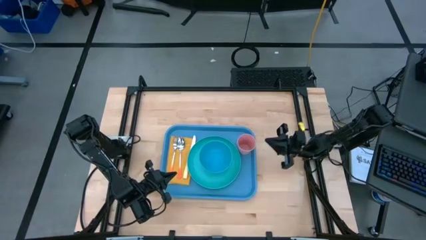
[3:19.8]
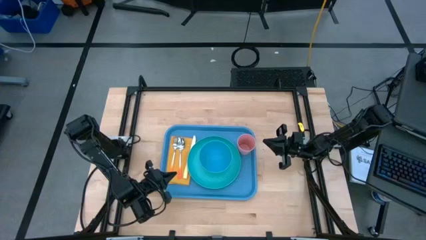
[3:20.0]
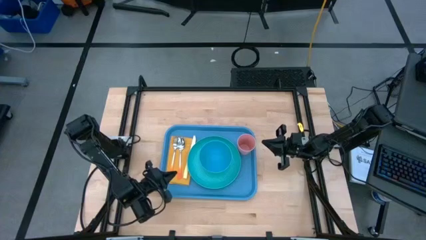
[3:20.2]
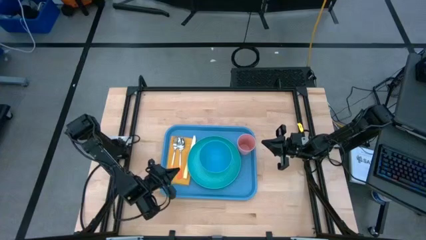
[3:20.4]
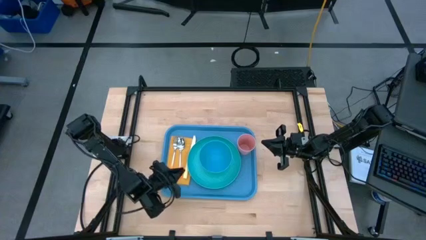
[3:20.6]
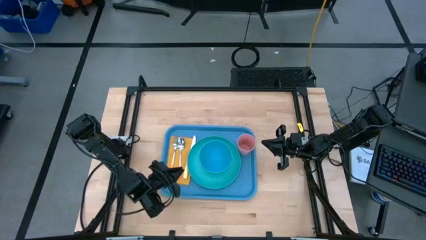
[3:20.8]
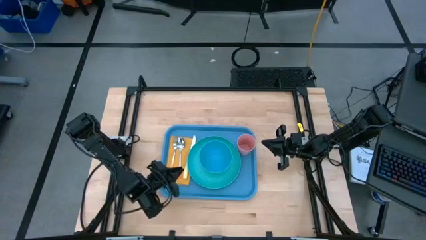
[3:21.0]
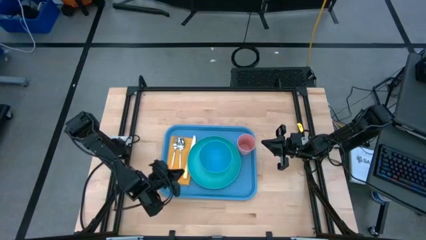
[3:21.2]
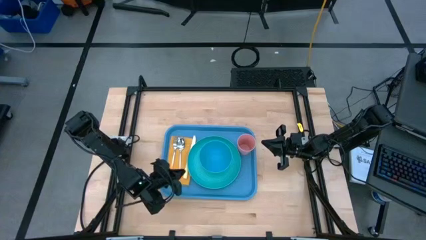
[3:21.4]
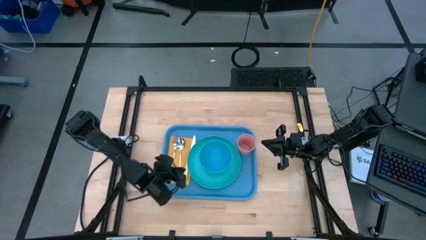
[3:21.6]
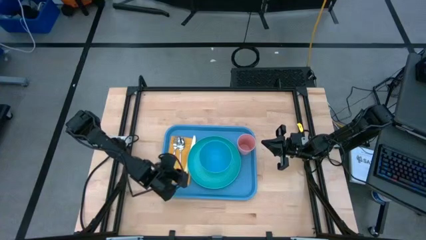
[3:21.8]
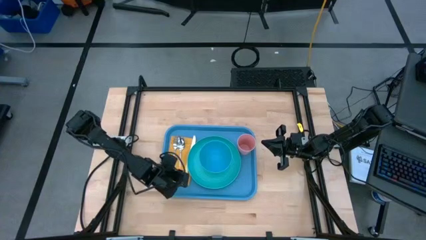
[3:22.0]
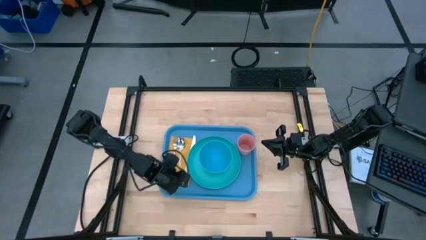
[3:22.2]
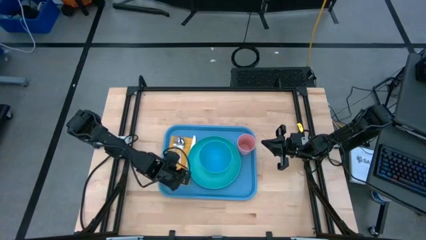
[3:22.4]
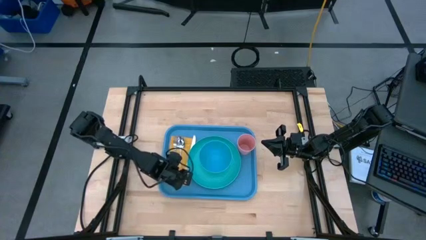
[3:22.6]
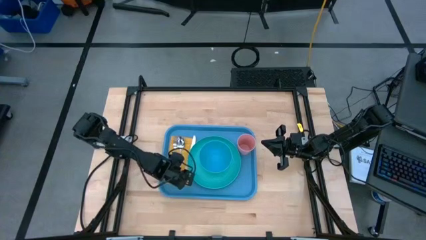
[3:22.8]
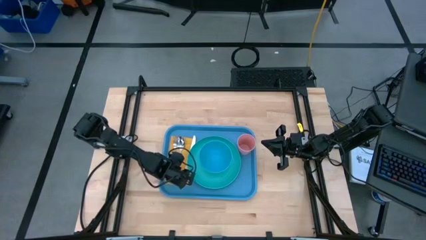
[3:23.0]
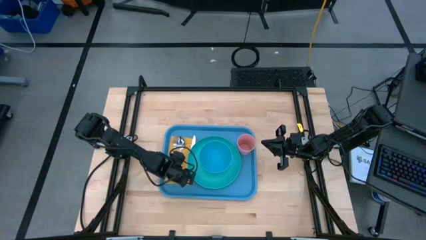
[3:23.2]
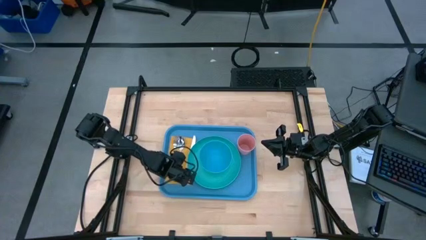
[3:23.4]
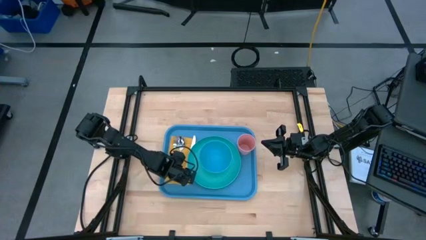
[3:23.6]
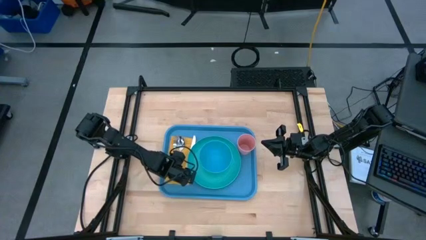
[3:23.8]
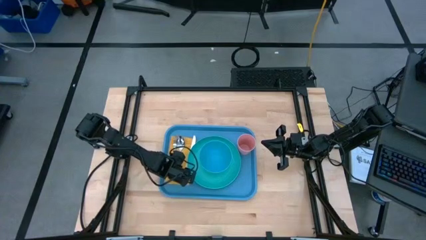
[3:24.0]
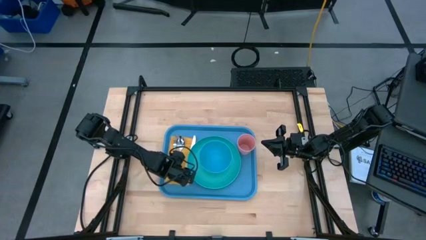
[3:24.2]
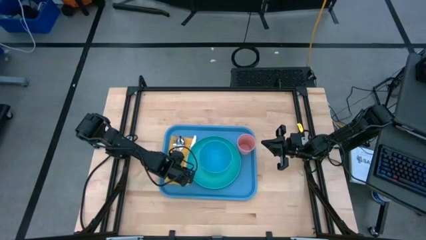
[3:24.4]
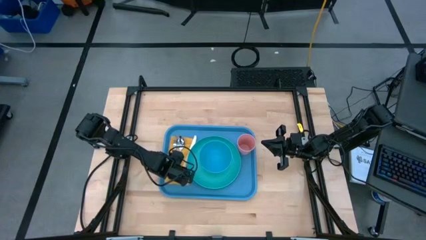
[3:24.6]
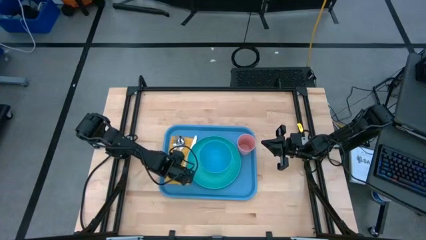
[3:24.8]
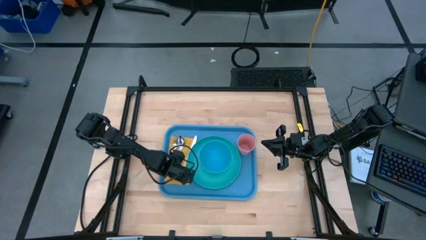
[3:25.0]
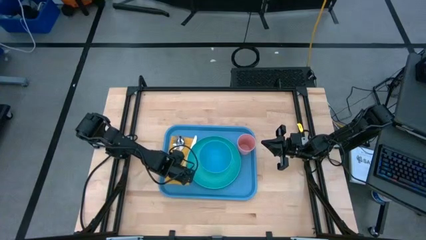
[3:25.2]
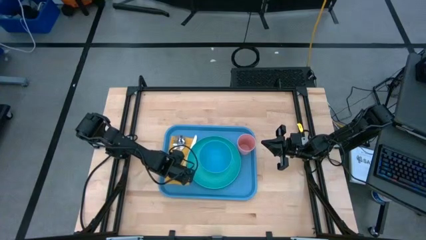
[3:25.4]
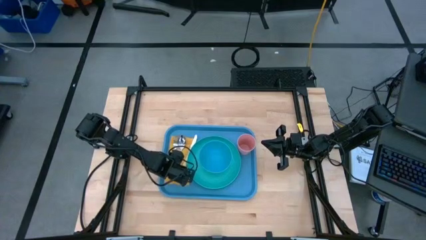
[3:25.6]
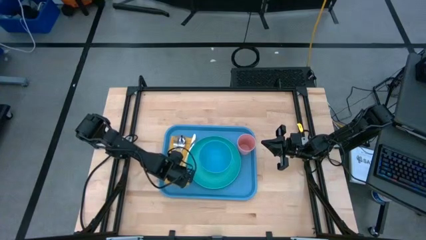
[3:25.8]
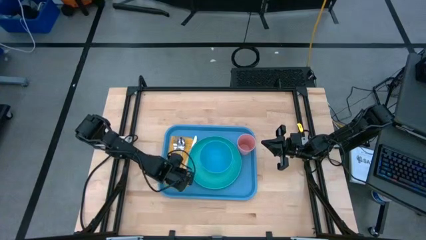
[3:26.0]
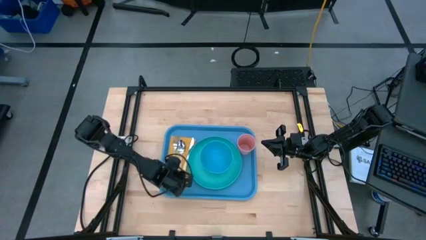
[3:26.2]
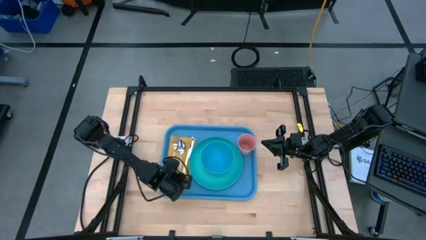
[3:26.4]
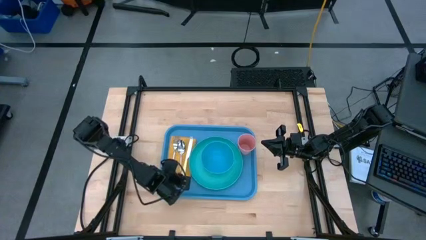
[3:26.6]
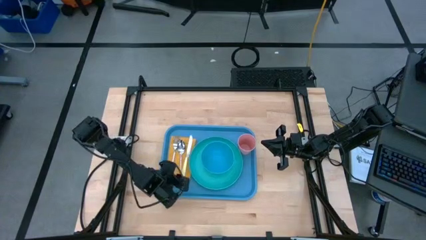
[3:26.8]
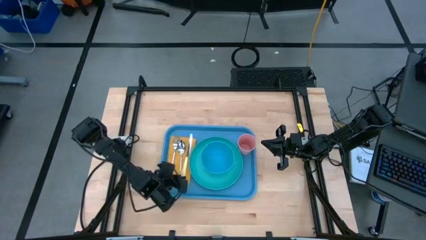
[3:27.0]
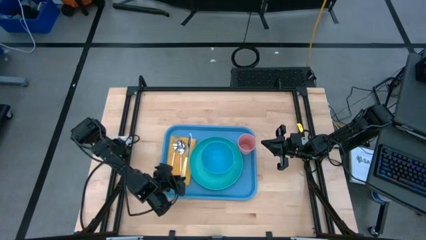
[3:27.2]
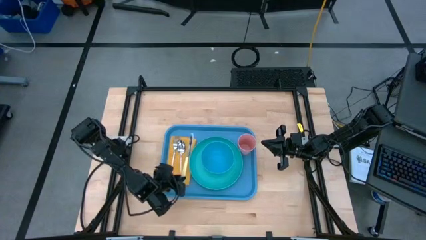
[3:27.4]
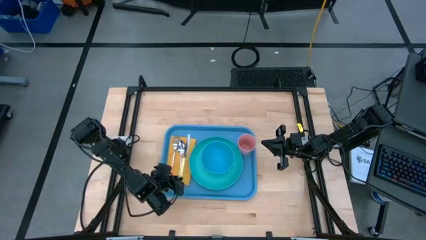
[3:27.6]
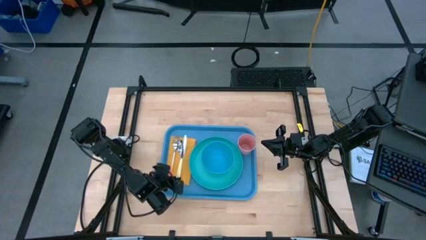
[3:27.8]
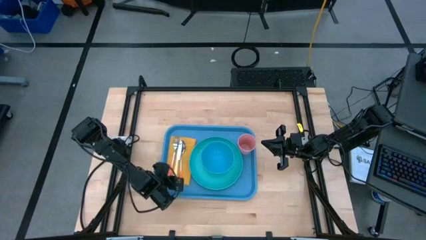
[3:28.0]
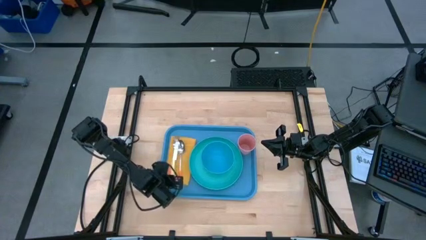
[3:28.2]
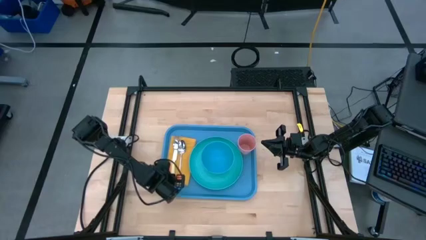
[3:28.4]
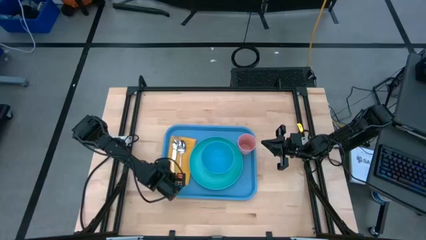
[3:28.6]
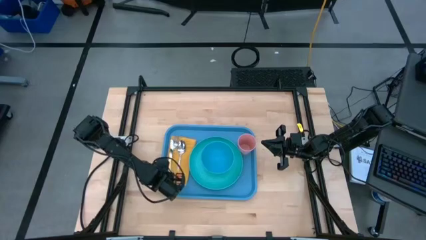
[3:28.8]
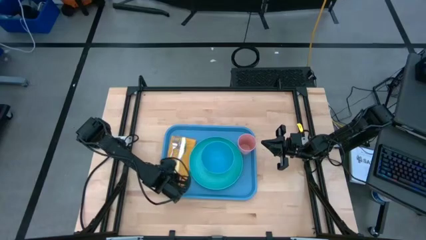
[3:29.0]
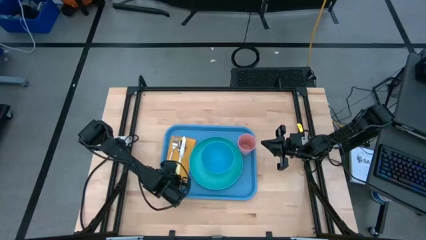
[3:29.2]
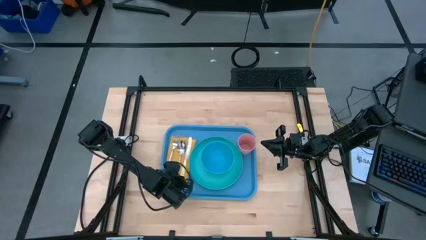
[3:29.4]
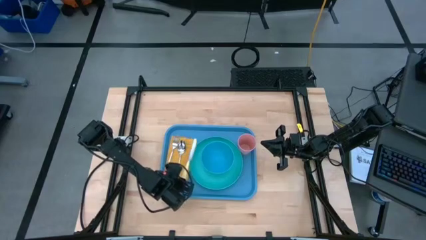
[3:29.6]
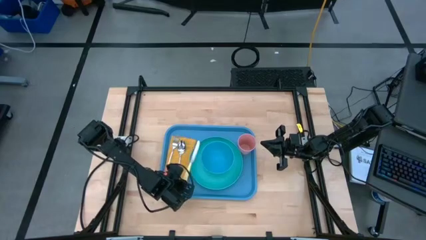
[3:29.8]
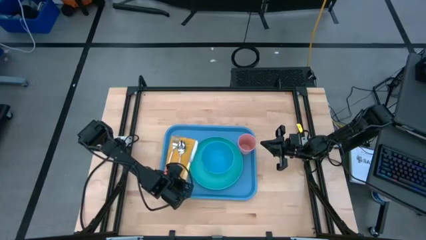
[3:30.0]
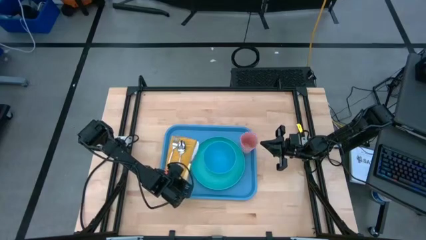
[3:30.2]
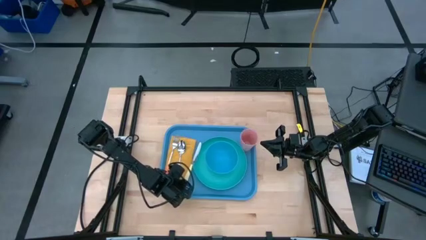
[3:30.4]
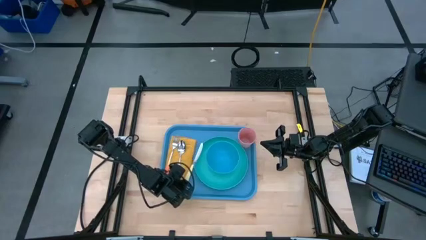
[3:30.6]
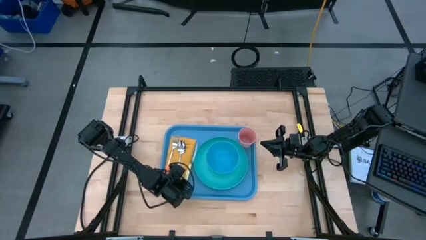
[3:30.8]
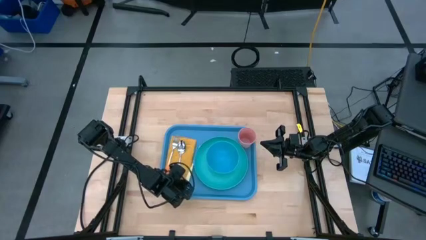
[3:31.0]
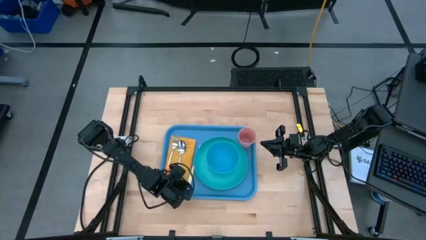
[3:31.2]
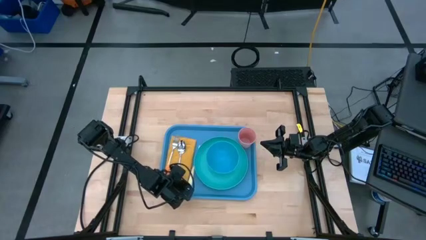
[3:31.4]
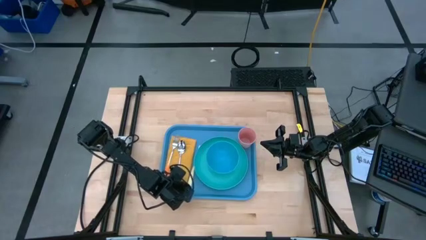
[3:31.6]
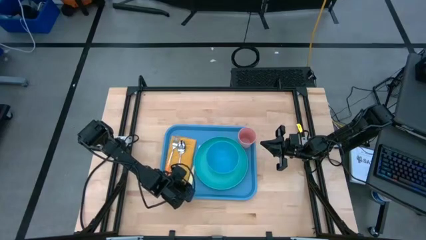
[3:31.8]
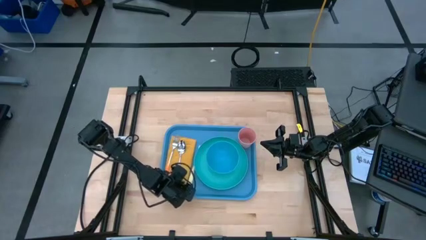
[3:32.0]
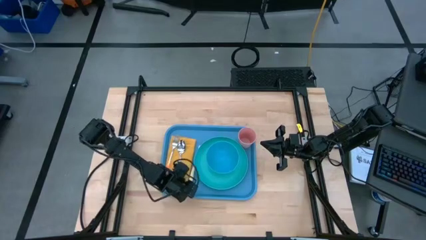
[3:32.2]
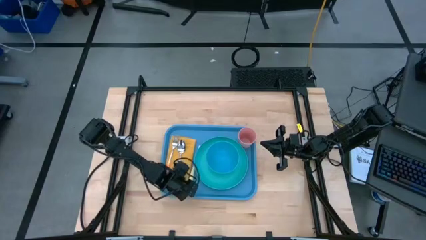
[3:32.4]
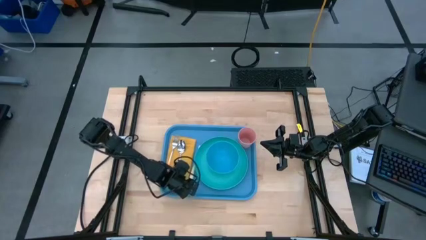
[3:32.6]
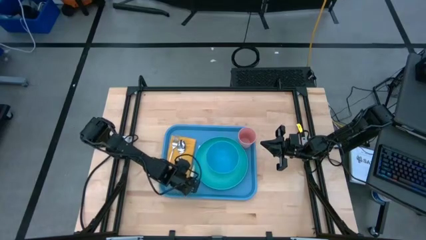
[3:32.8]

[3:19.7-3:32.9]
Task: Set up tray
Adjust the yellow knife on the yellow napkin on the blue serving tray
